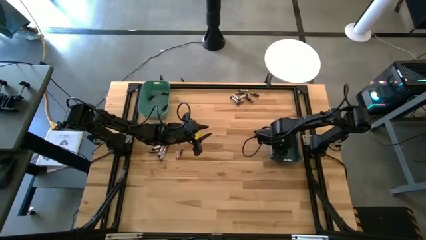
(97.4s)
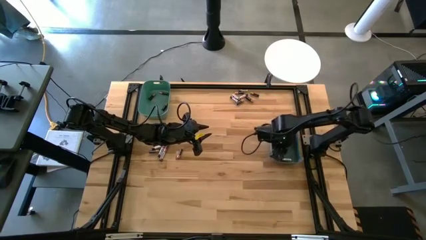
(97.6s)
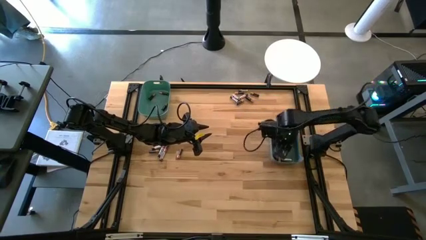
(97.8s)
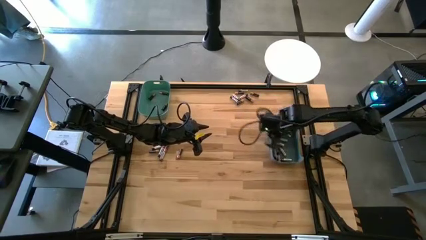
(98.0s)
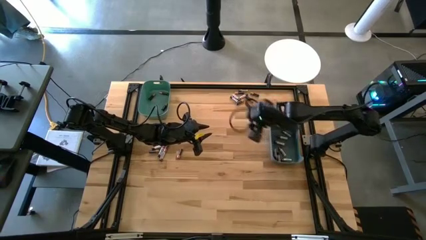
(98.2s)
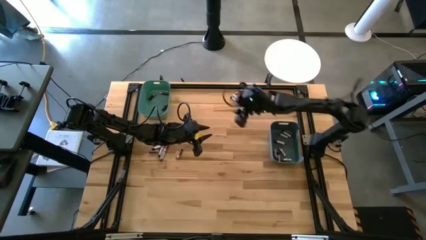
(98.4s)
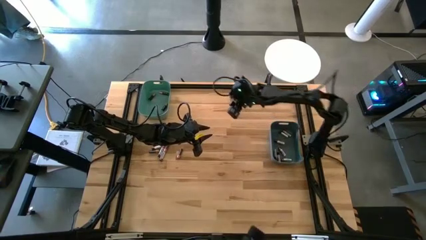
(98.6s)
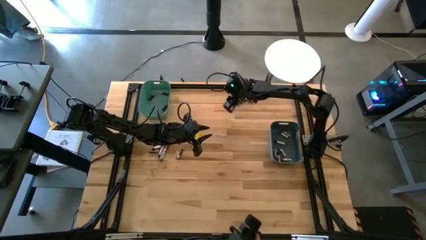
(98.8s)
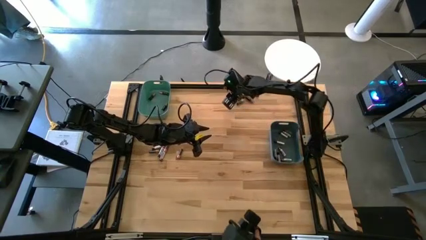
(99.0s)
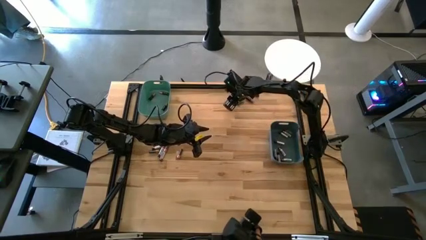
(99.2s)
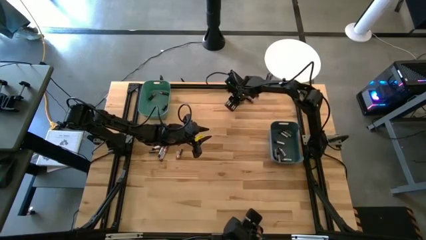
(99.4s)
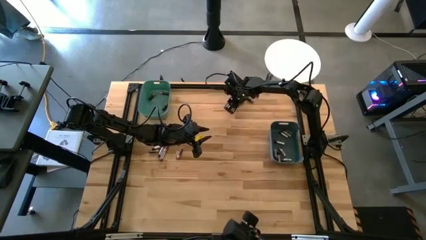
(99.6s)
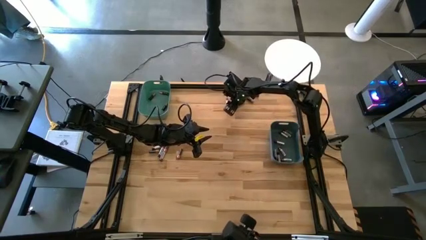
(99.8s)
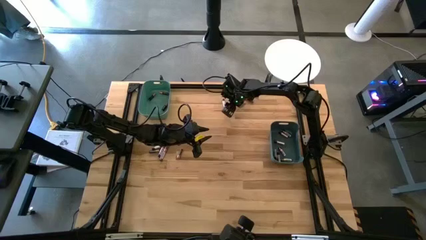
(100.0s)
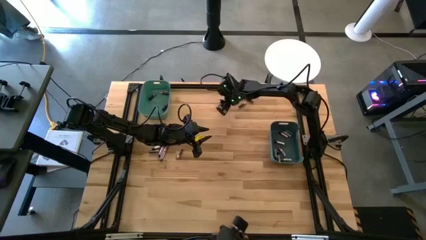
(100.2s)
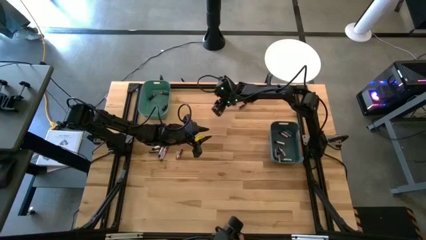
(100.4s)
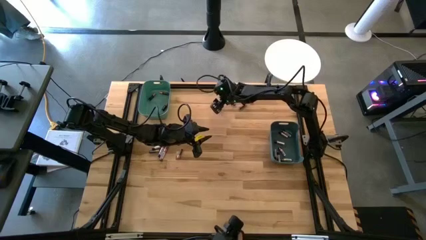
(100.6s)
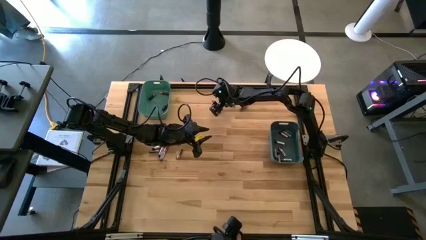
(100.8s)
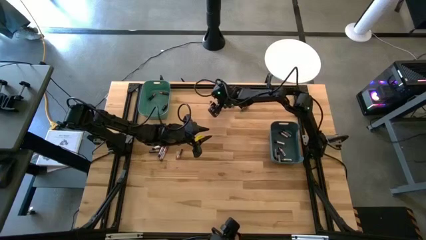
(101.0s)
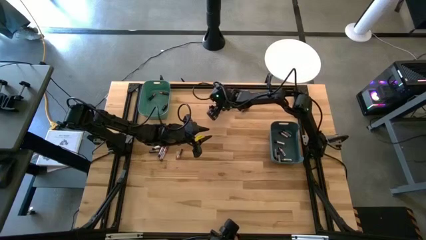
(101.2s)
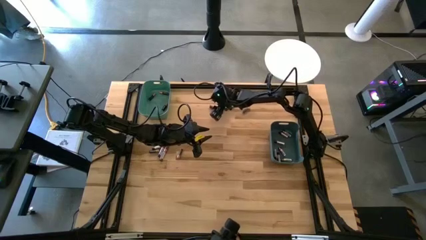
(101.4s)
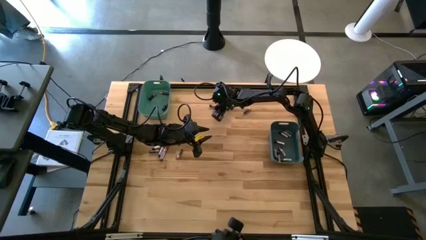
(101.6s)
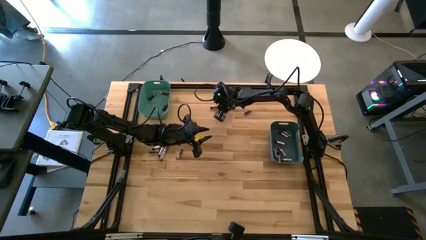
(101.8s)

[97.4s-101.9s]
Task: Sort batteries
Put the silver battery into the blue bin

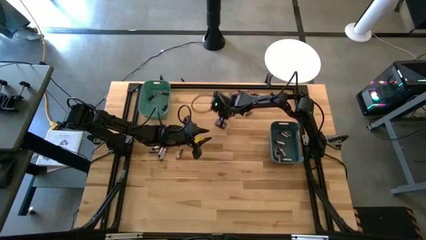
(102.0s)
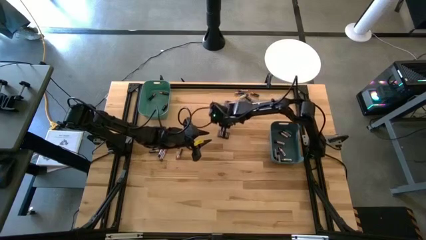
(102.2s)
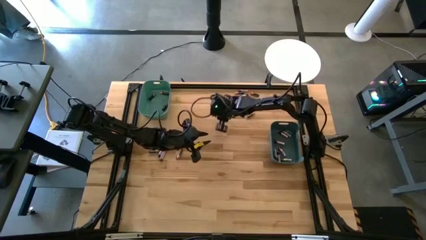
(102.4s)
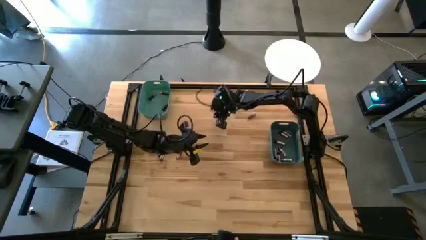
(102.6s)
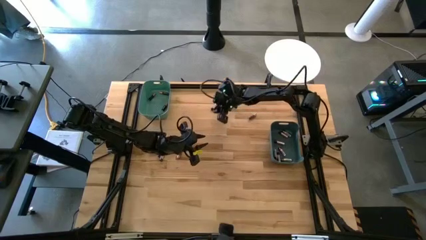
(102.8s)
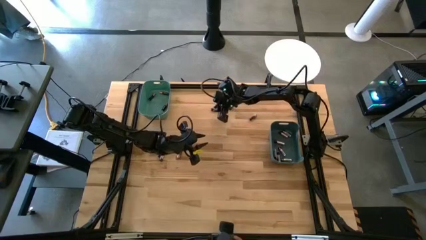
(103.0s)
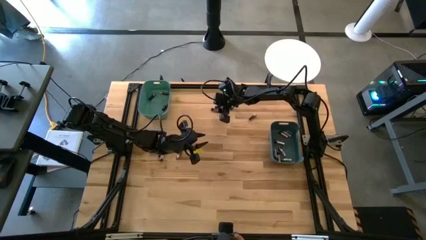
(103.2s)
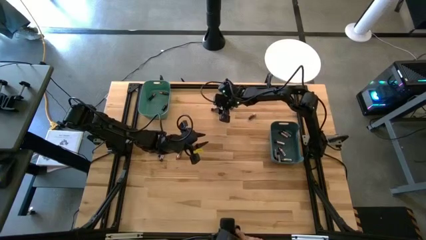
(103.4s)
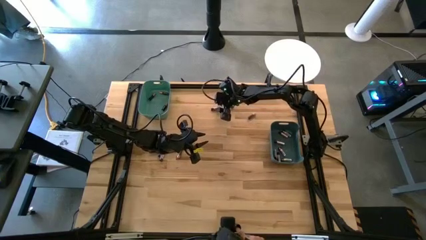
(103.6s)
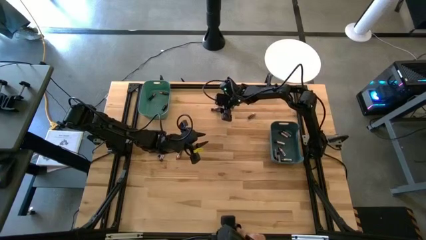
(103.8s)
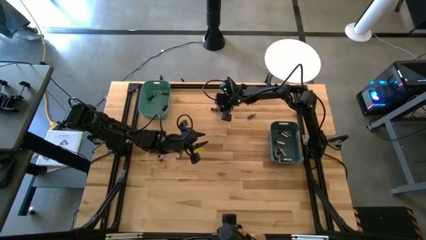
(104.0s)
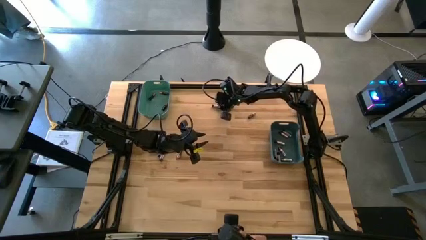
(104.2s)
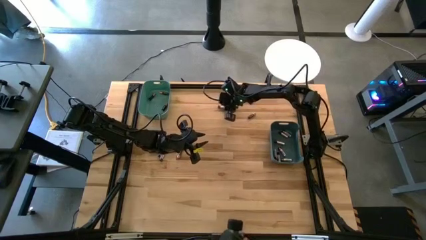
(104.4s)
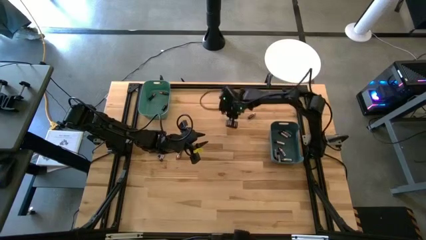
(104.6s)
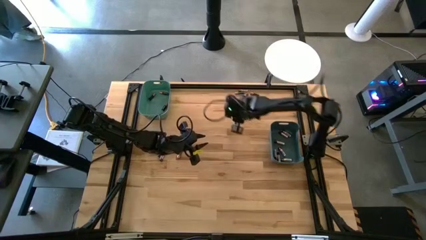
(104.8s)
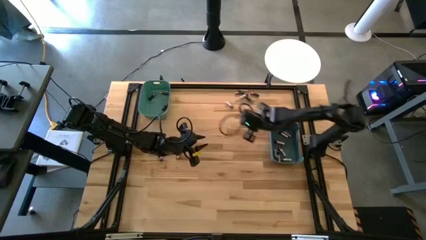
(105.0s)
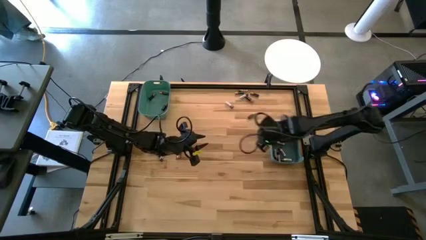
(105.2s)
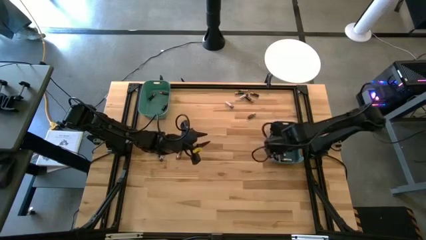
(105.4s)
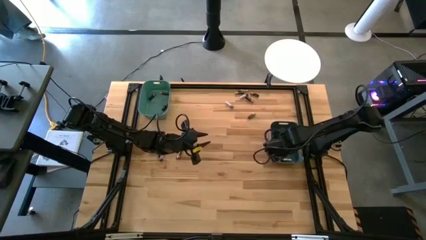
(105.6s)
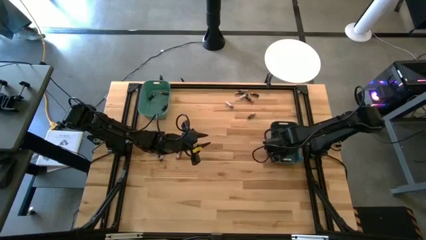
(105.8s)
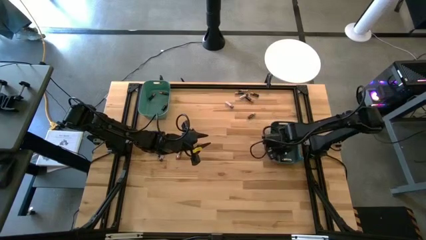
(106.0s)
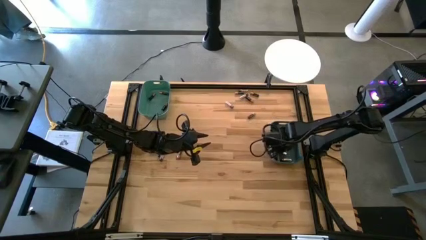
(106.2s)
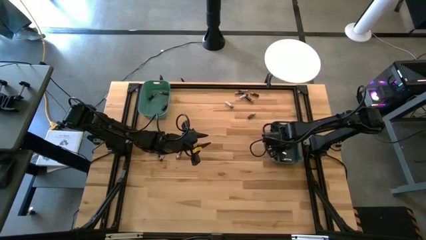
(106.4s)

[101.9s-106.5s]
Put the silver battery into the blue bin

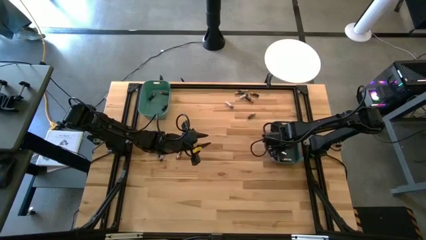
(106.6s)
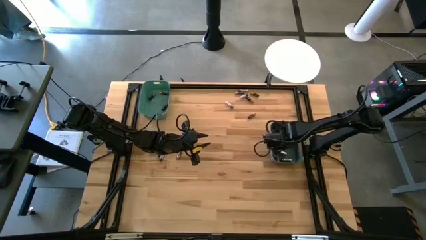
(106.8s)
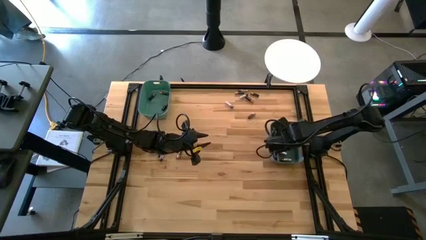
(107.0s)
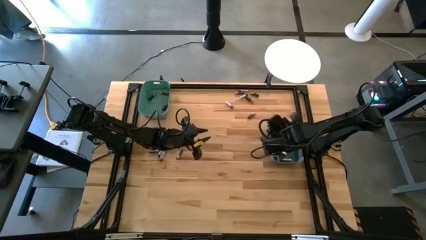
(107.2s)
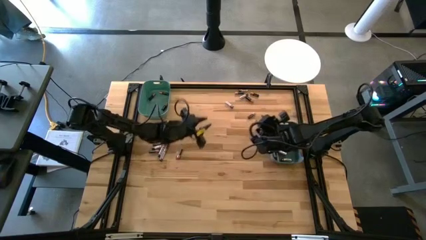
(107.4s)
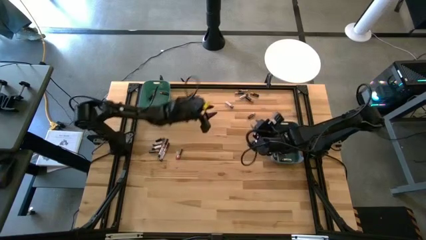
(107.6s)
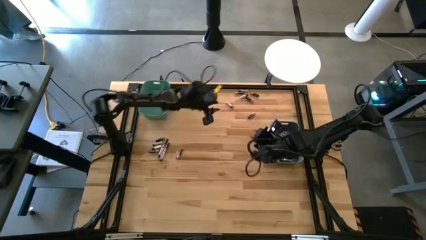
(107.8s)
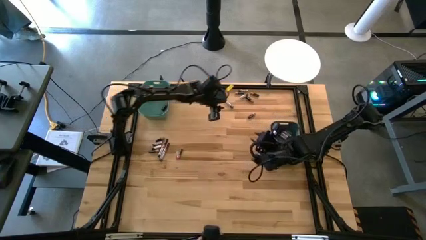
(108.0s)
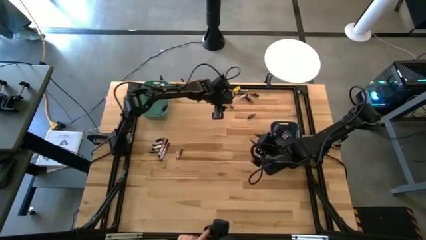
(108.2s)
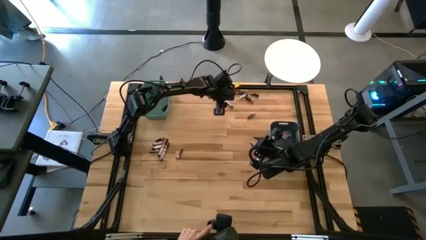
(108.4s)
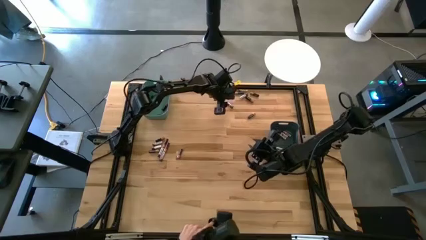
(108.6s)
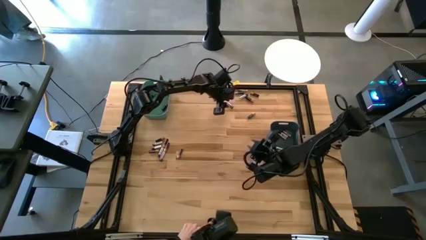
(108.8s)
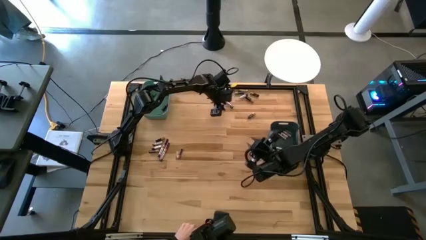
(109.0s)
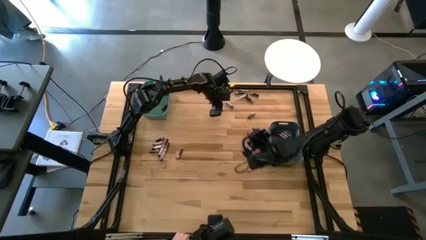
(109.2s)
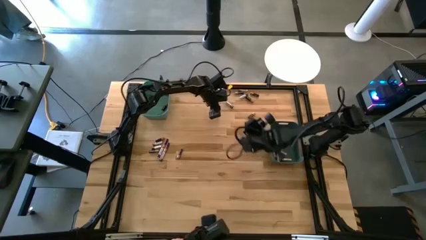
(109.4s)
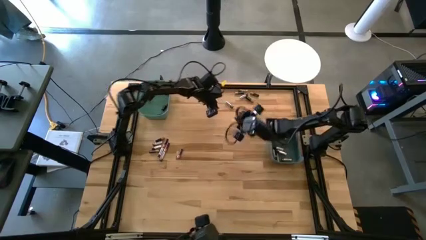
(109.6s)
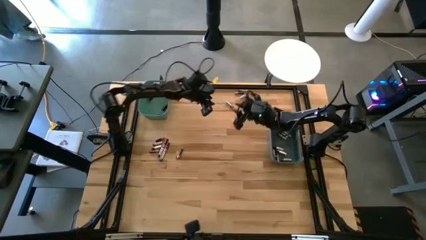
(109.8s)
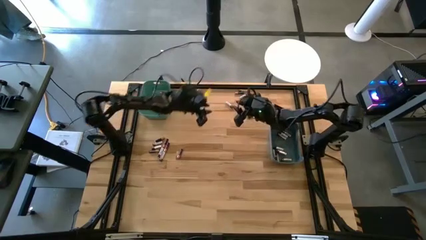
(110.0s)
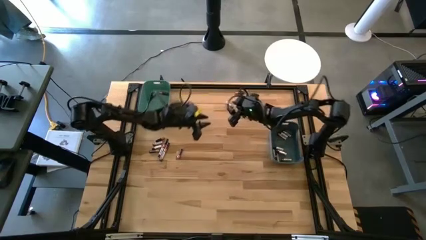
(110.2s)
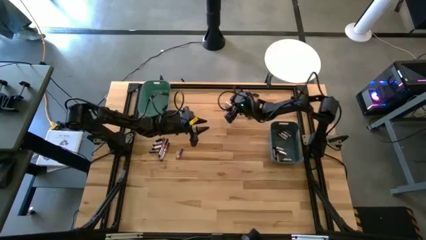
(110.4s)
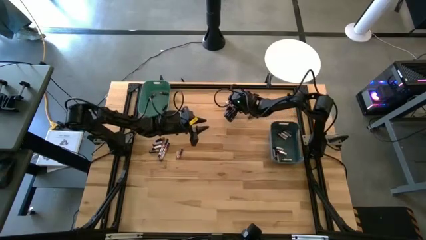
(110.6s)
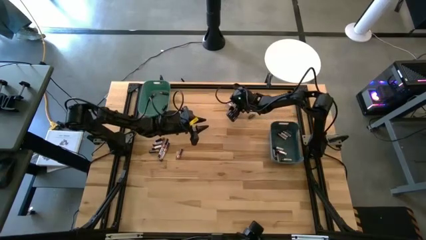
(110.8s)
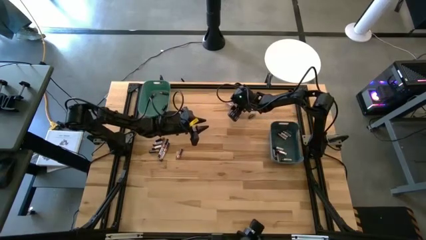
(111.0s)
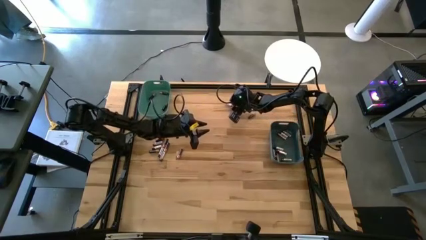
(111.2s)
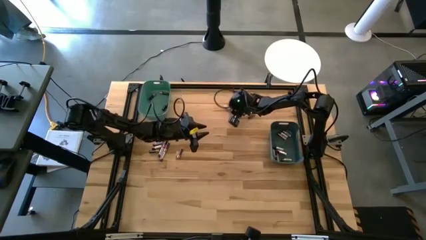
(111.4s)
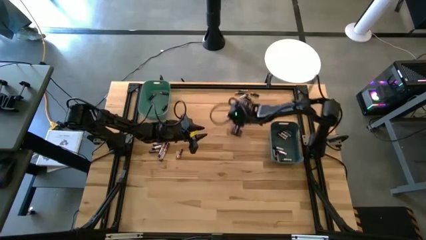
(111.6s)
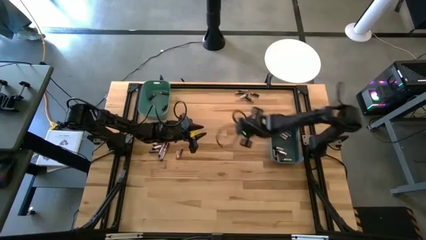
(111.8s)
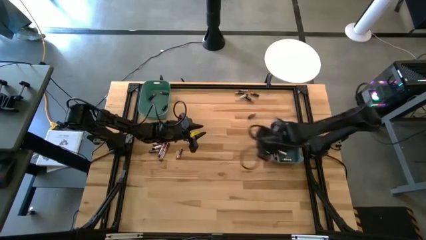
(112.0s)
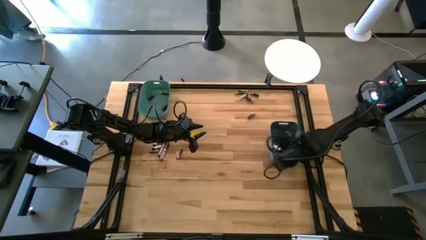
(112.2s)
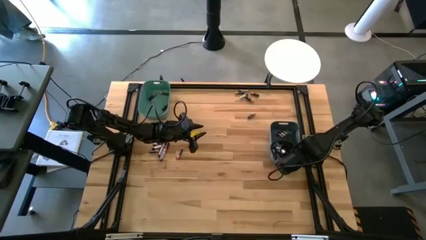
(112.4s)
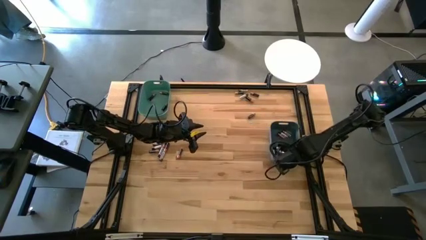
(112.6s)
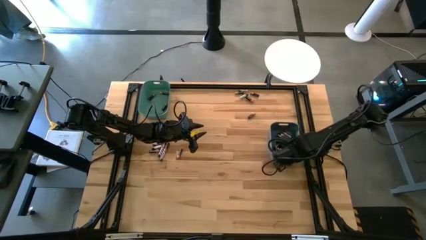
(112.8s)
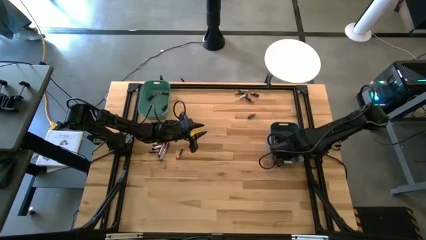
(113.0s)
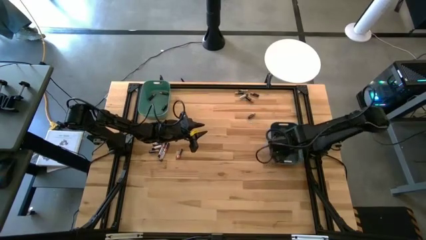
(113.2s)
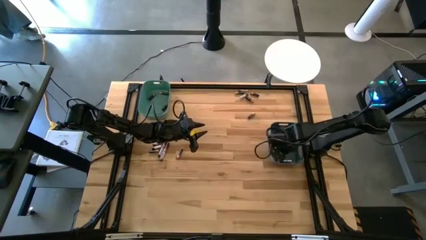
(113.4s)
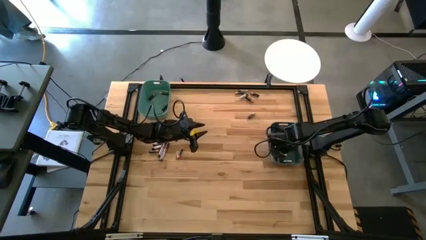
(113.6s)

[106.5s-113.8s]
Put the silver battery into the blue bin
